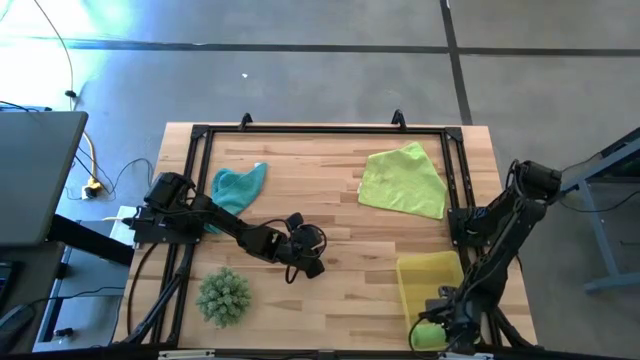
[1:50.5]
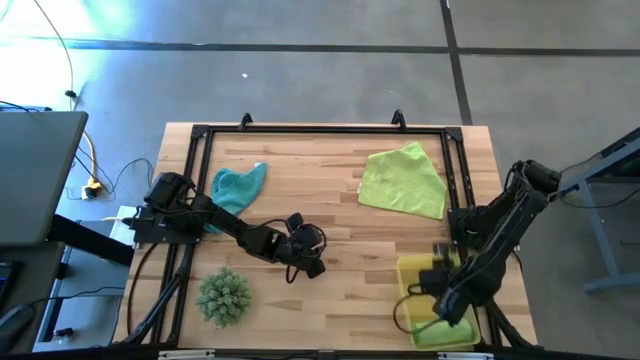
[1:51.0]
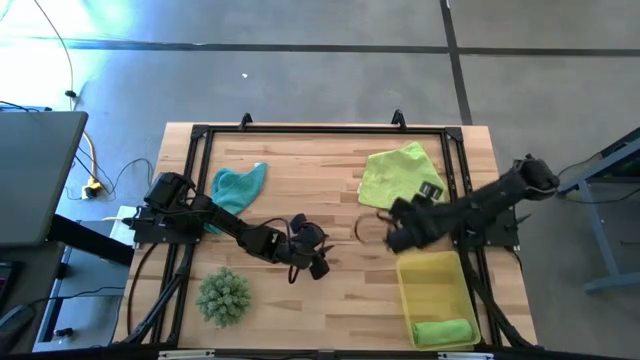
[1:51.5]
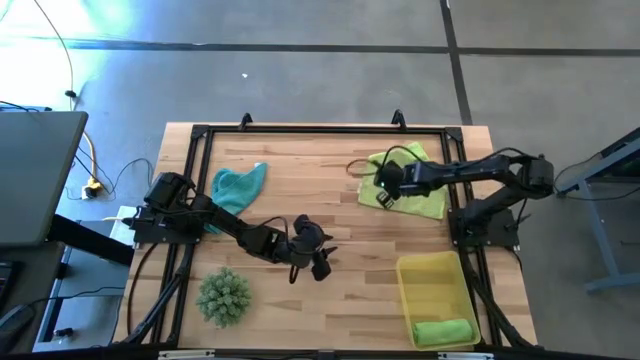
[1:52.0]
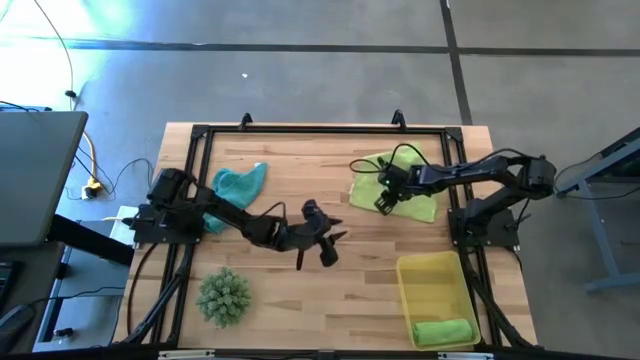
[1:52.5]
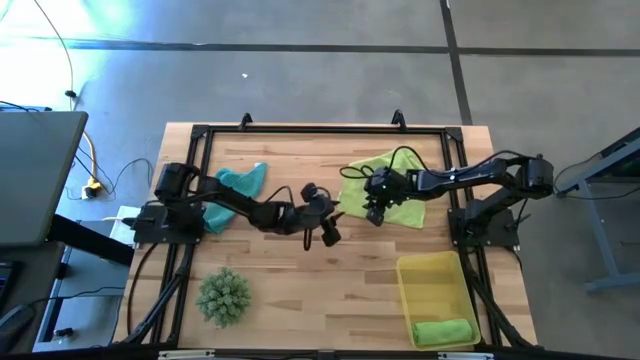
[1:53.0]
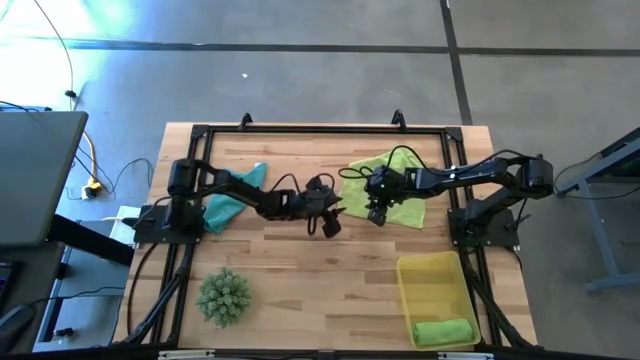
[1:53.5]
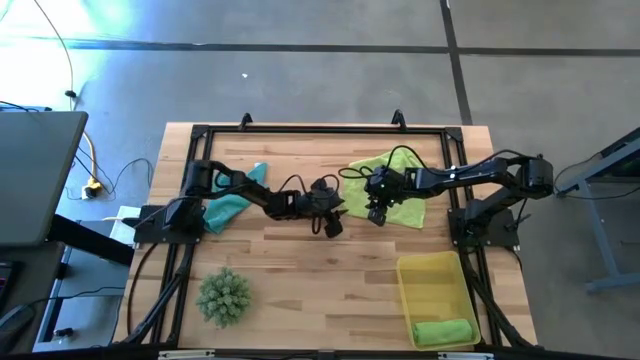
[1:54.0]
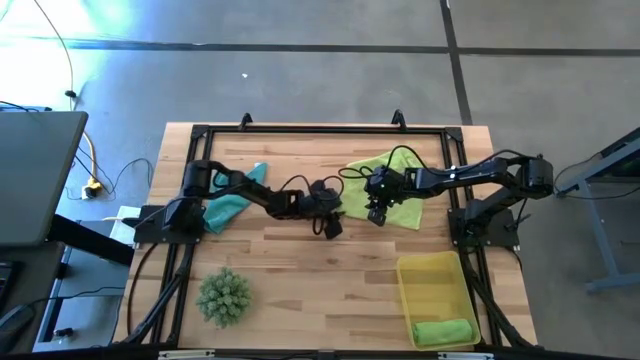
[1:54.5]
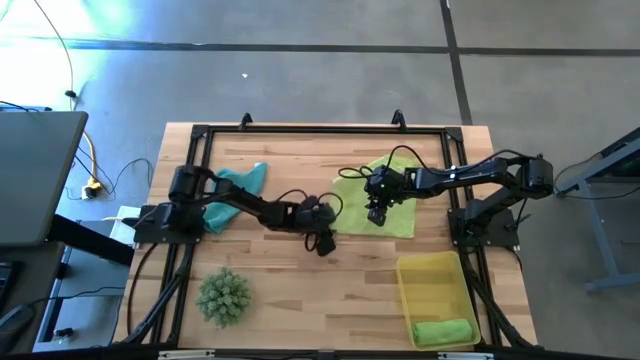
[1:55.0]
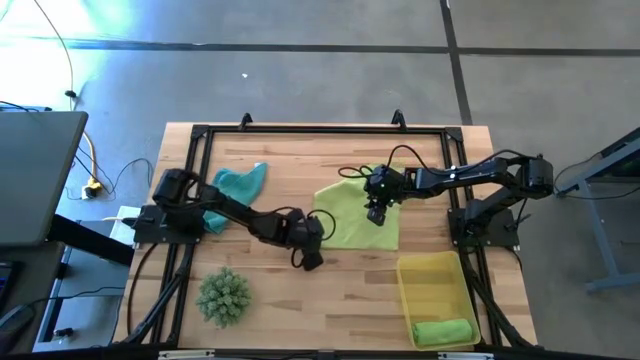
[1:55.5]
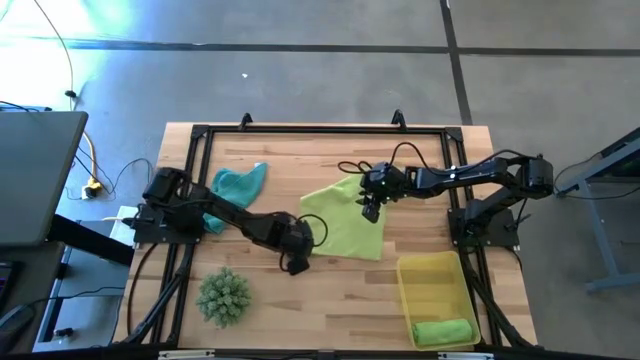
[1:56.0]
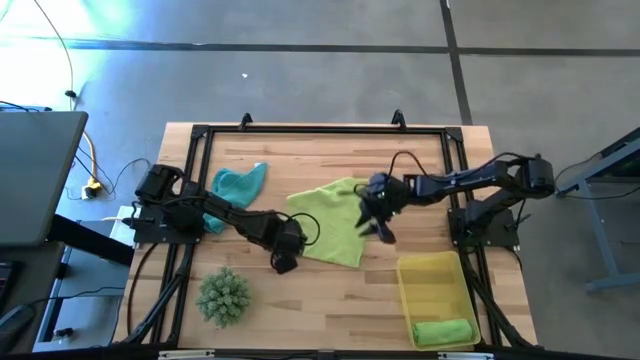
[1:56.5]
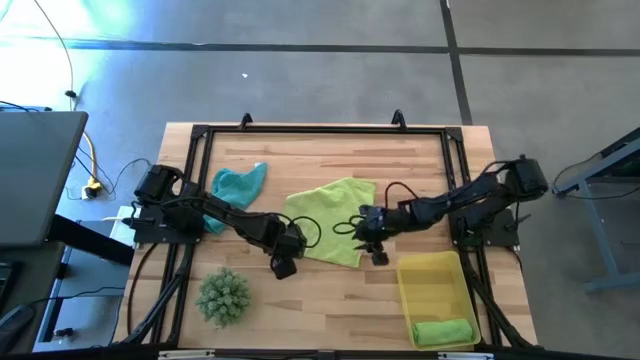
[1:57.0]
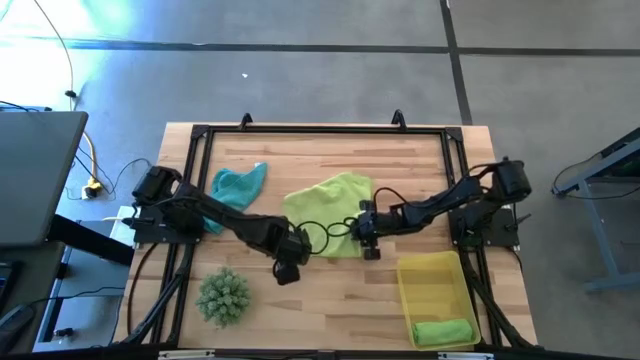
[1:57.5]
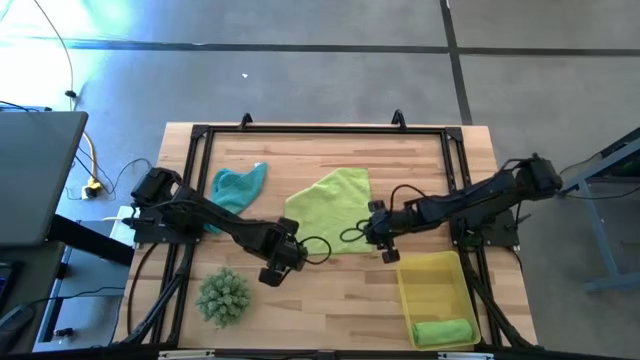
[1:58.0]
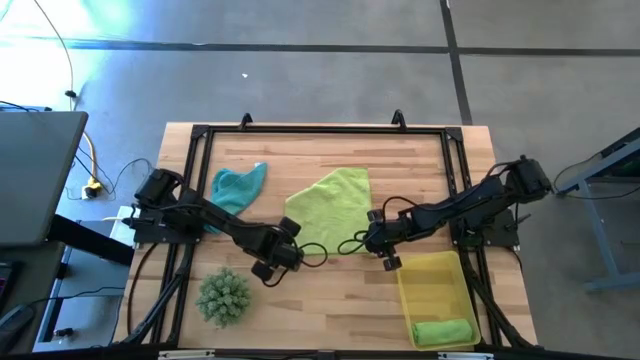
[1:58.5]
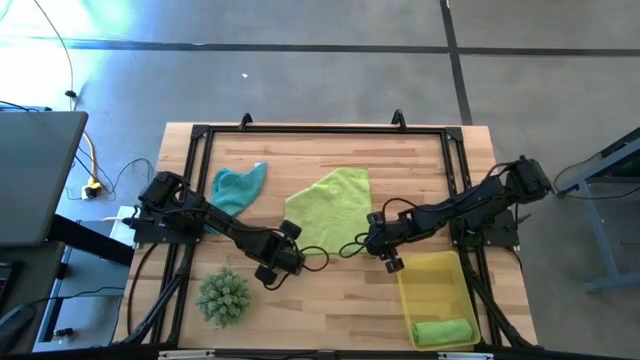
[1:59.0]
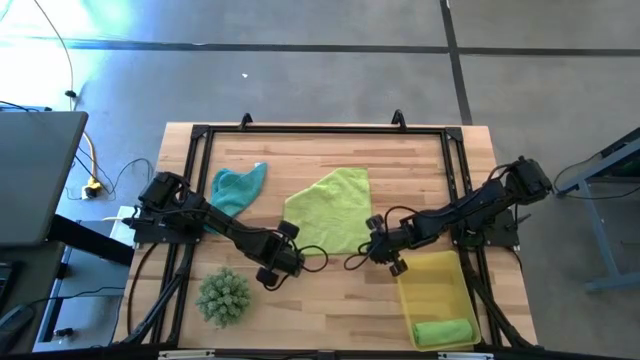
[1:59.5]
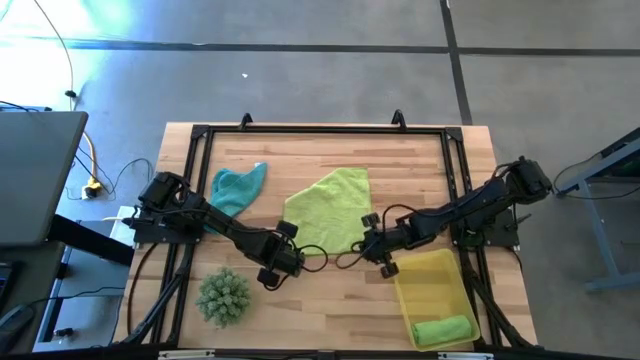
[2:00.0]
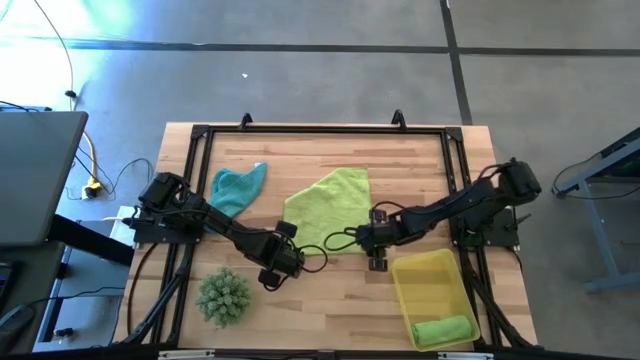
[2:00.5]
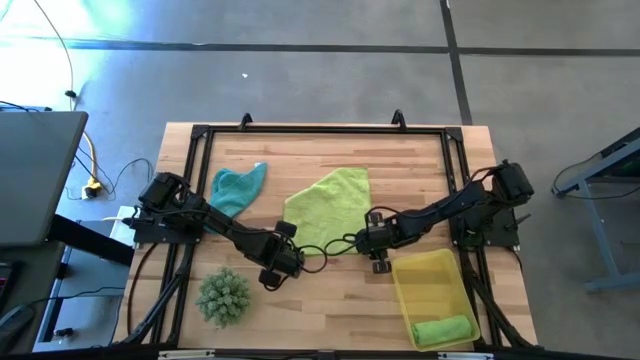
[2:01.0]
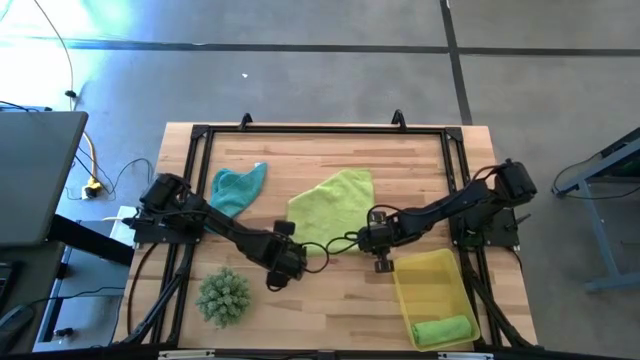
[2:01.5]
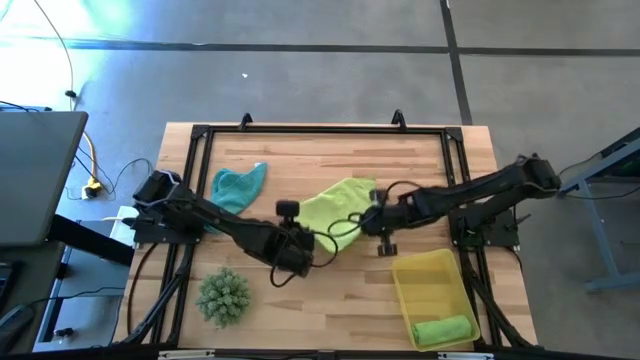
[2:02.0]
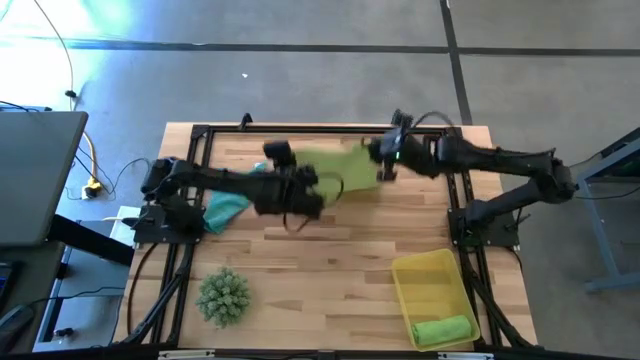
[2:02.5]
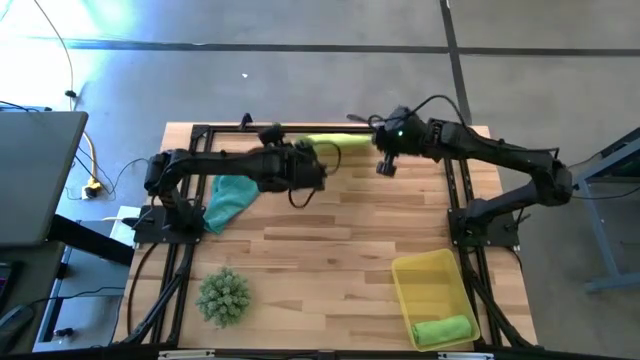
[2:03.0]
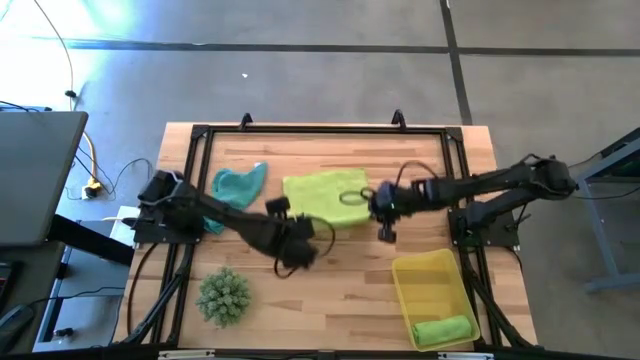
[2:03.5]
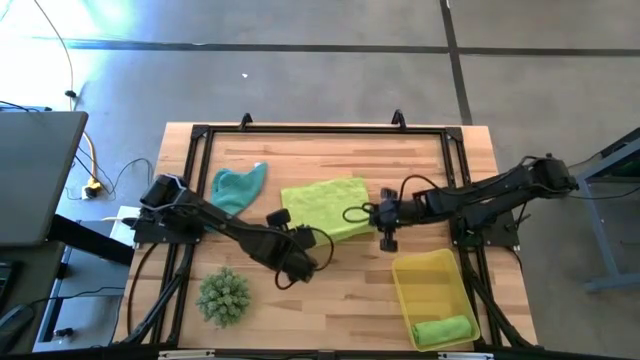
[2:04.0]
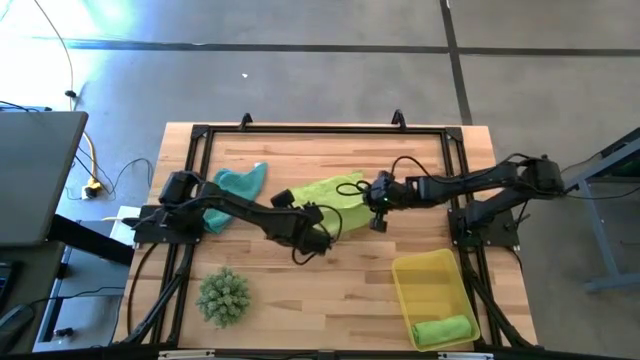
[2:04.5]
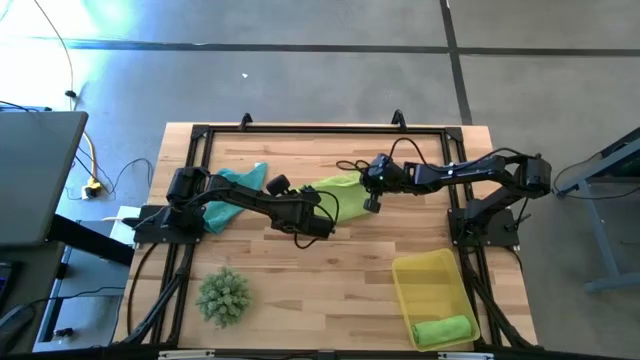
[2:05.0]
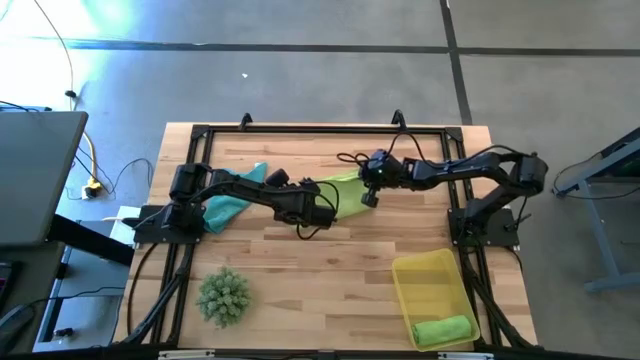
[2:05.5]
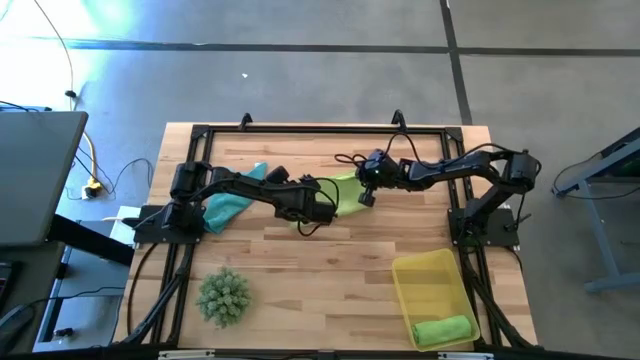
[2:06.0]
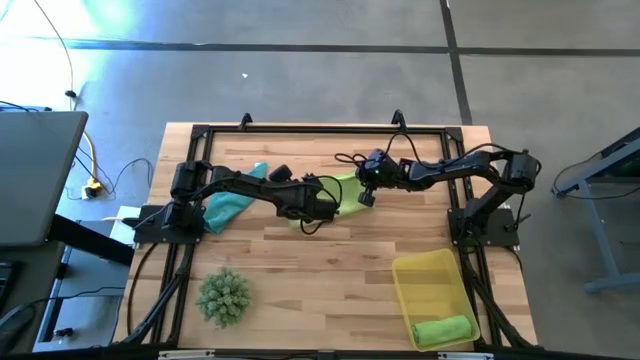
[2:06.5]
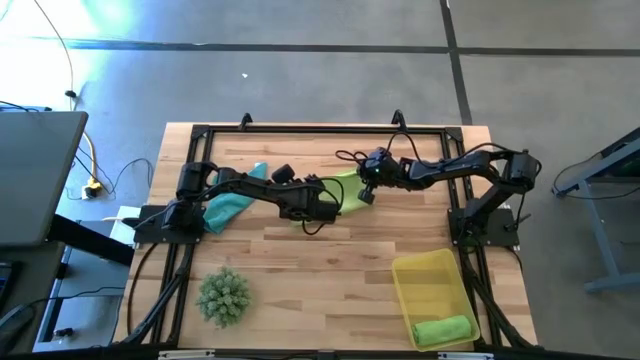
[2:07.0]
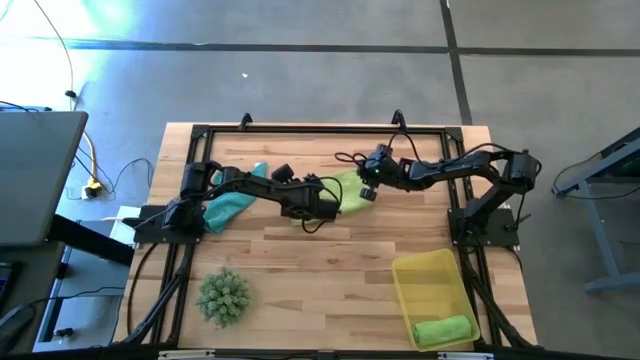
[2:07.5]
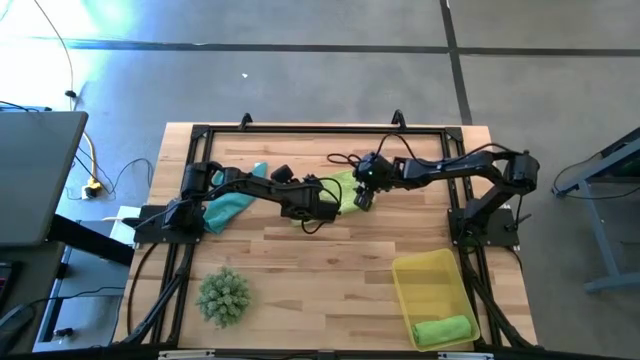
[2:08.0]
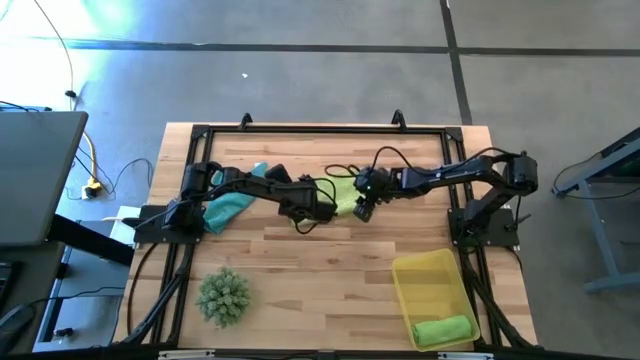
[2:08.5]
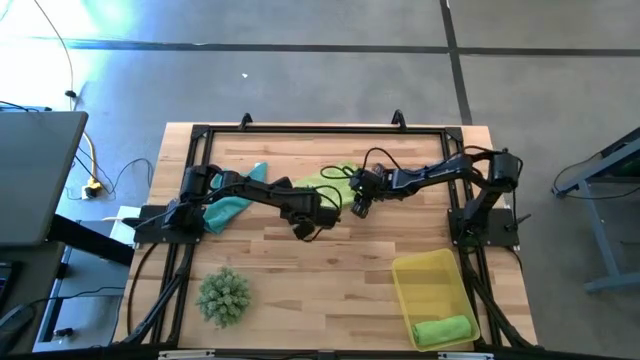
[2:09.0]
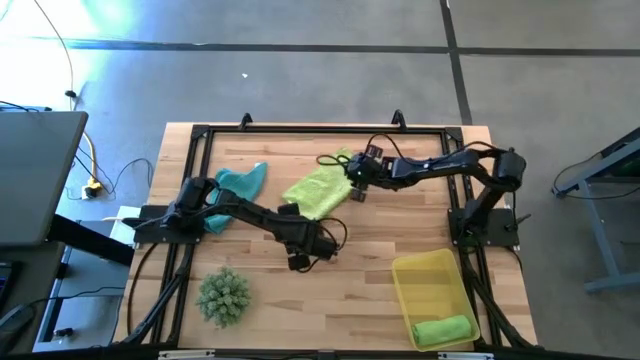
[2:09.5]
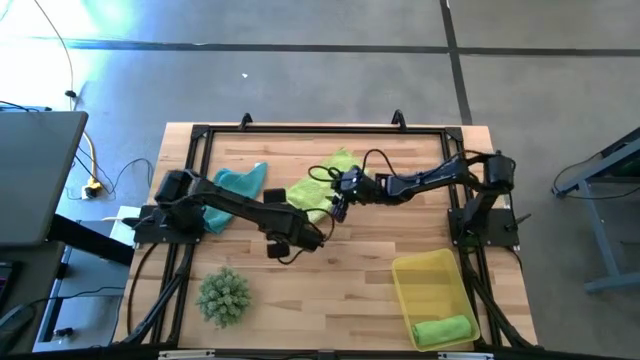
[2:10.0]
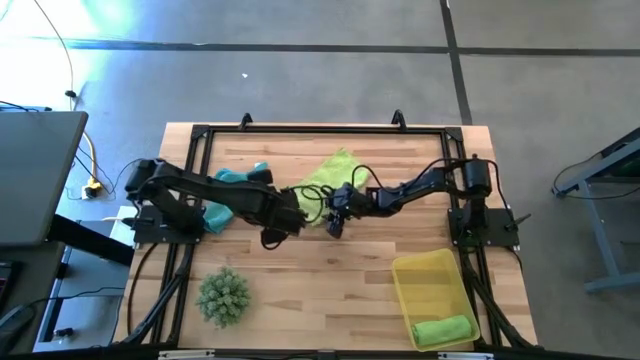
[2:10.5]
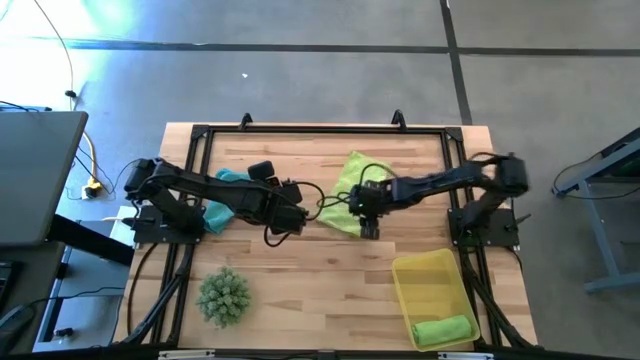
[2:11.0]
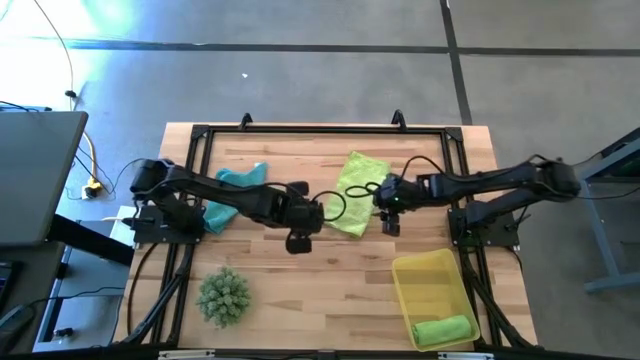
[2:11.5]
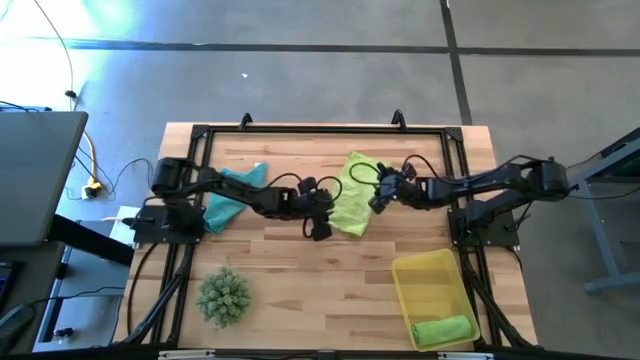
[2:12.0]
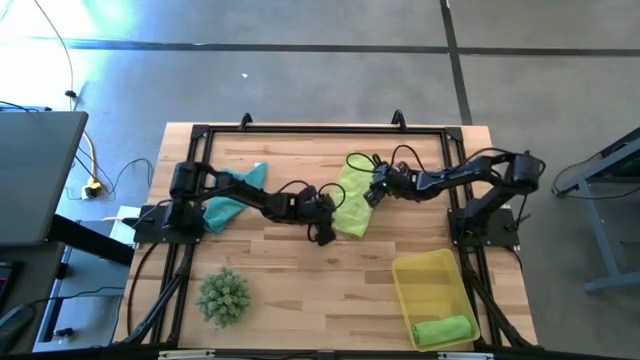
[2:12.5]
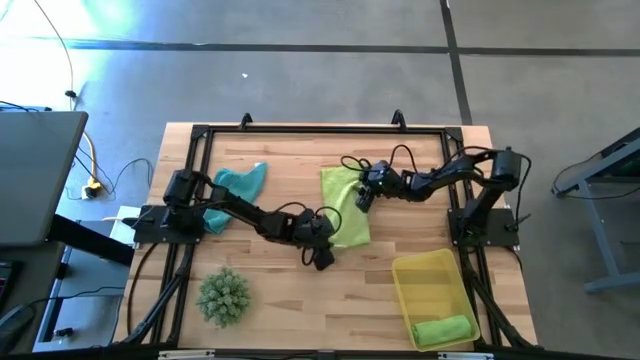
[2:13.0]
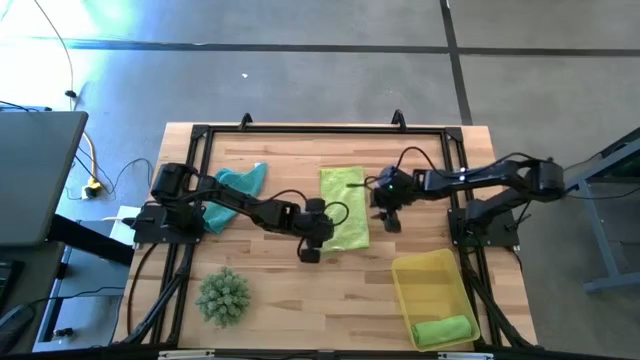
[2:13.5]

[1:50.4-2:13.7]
Task: Roll microfiber towels into tight, uniform cylinder then place into a basket
Fold the light green microfiber cloth
